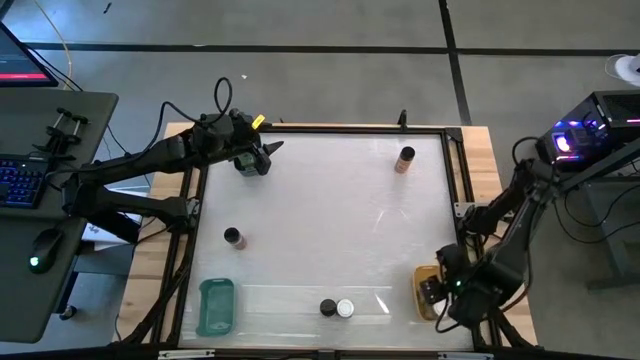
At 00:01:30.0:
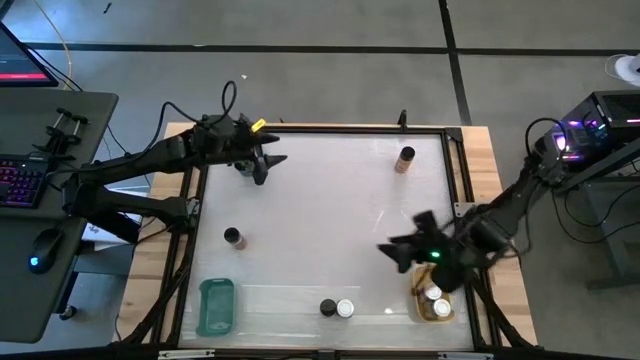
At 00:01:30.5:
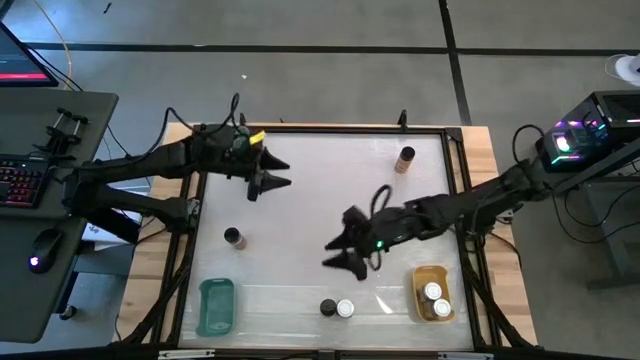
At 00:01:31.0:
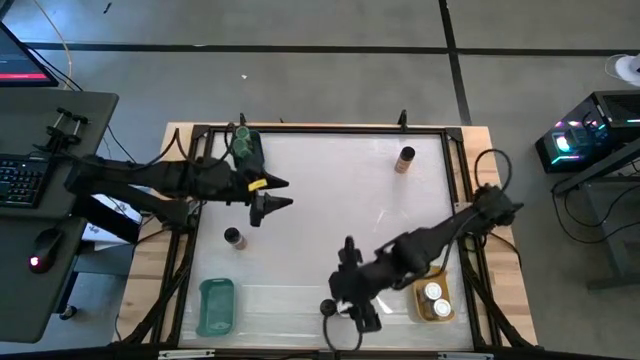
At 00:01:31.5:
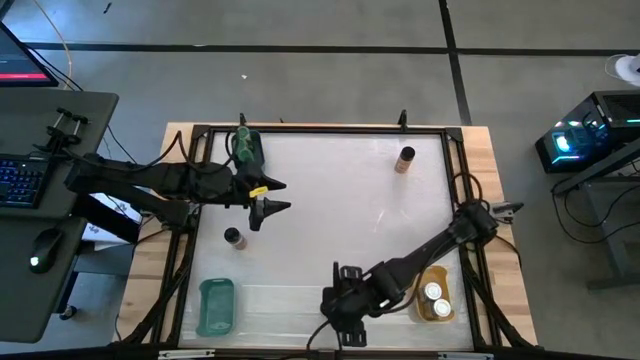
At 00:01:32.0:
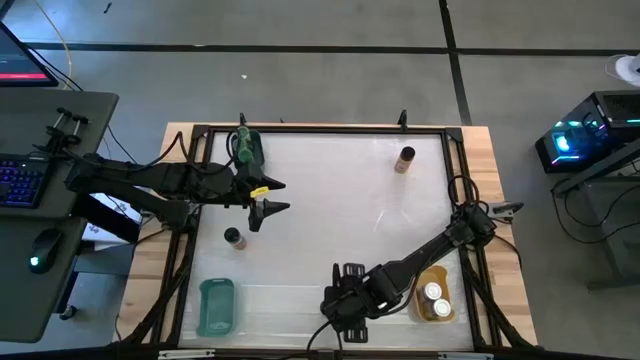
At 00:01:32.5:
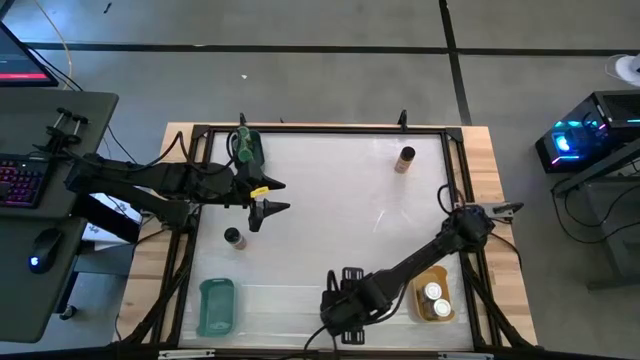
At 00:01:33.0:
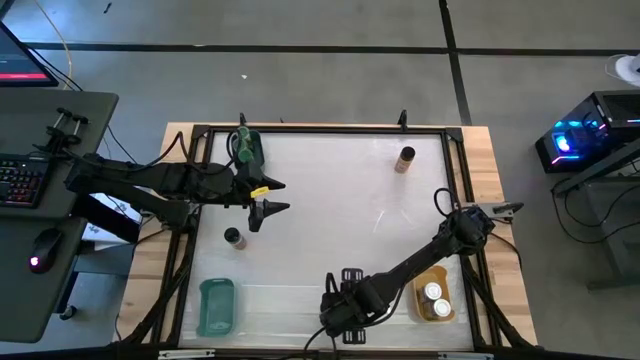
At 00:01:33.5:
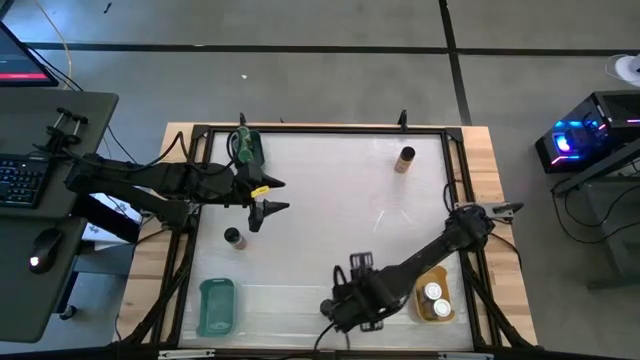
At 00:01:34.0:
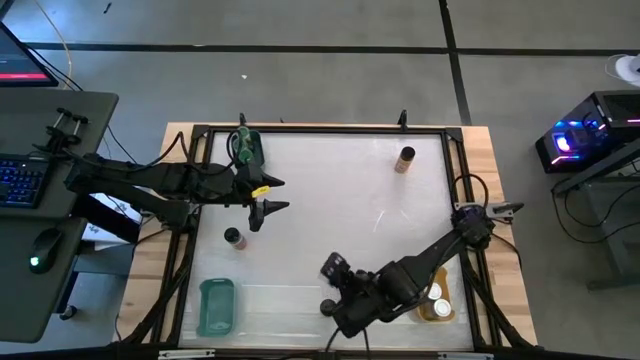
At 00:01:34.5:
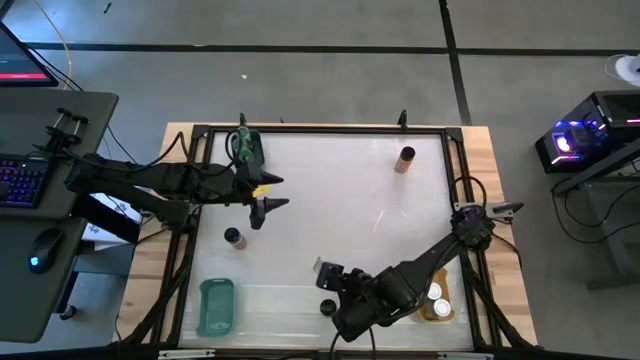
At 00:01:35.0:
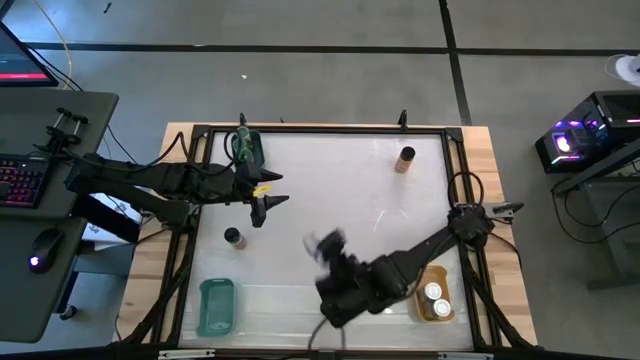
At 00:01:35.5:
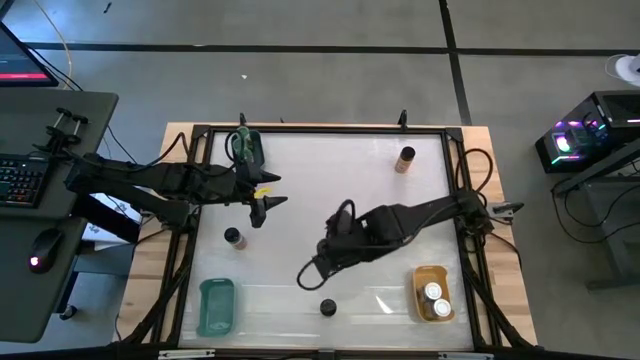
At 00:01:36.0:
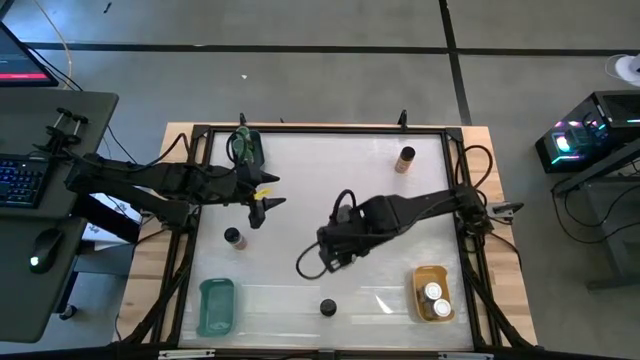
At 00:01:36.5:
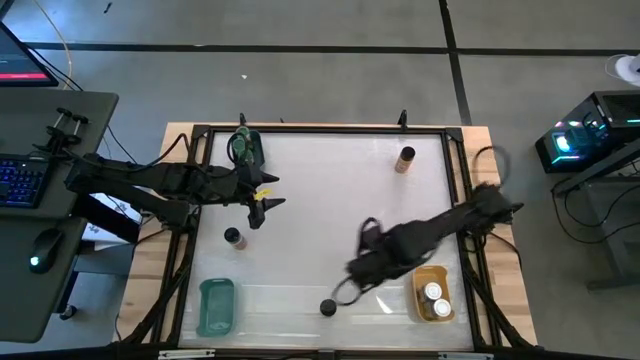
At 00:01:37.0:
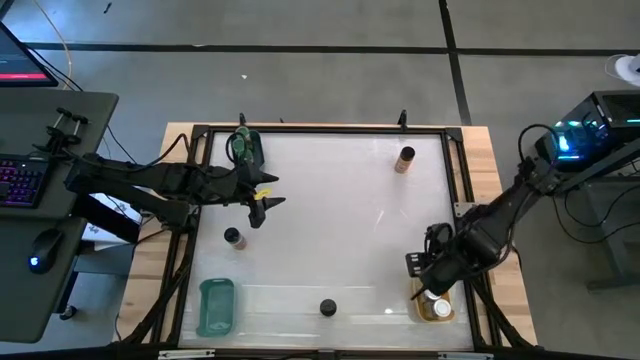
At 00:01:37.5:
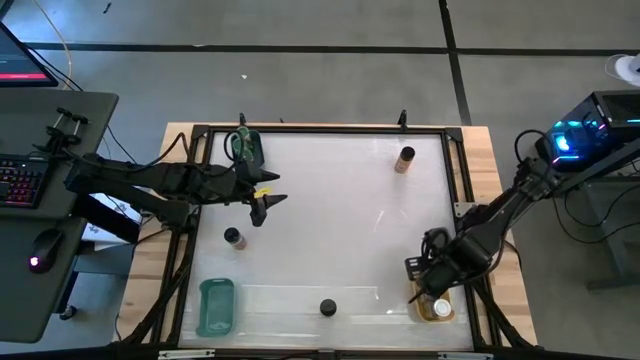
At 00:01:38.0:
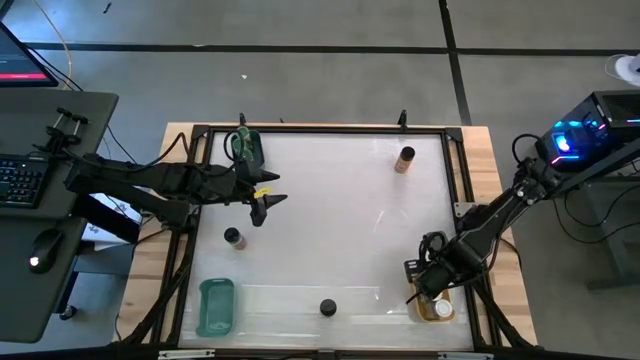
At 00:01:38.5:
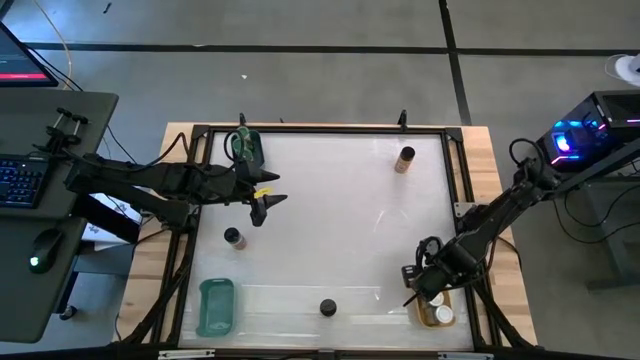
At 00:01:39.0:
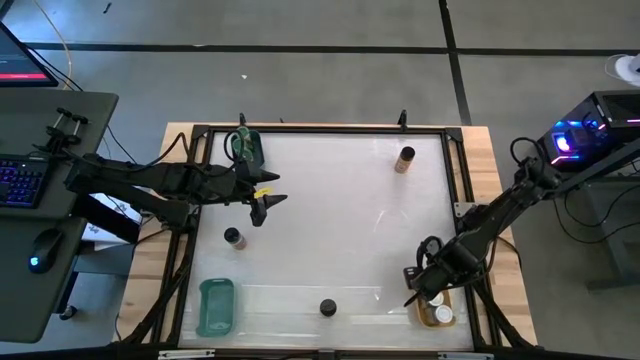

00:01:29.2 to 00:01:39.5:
Task: Sort spices by type
Put the white seasoning bottle into the yellow bin

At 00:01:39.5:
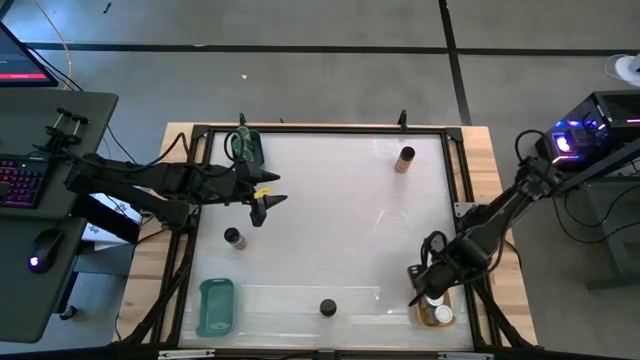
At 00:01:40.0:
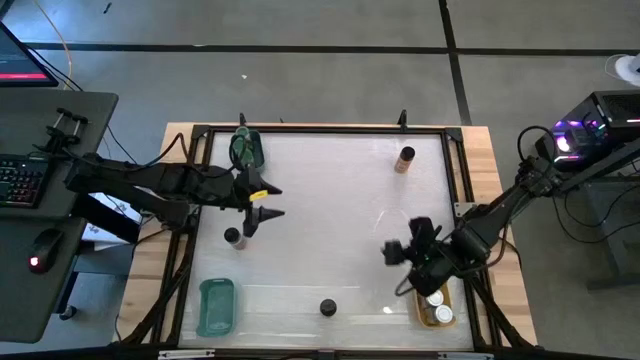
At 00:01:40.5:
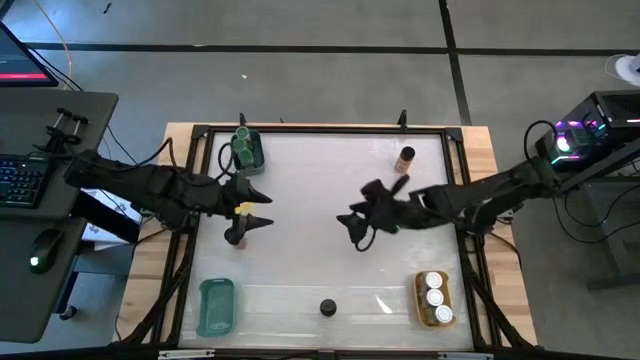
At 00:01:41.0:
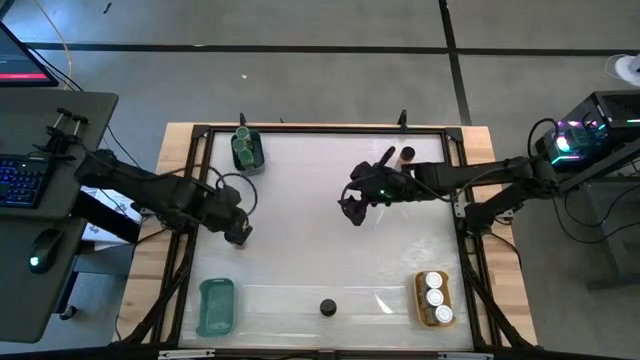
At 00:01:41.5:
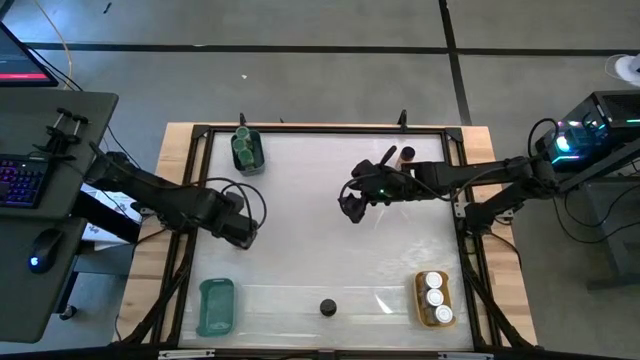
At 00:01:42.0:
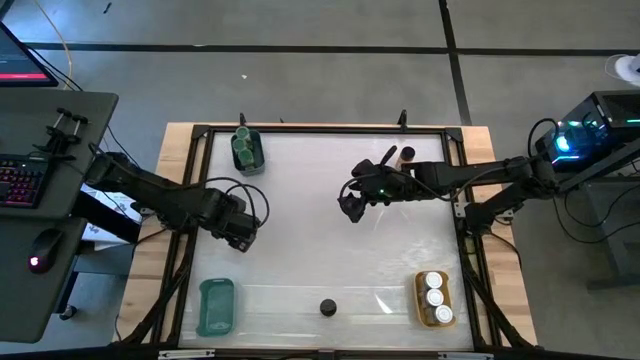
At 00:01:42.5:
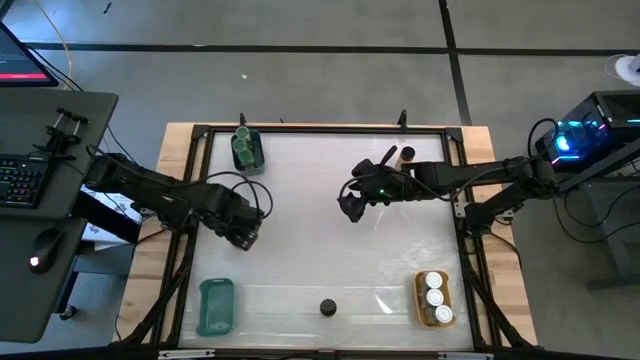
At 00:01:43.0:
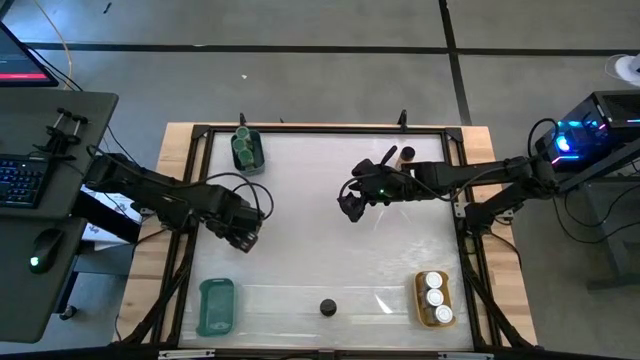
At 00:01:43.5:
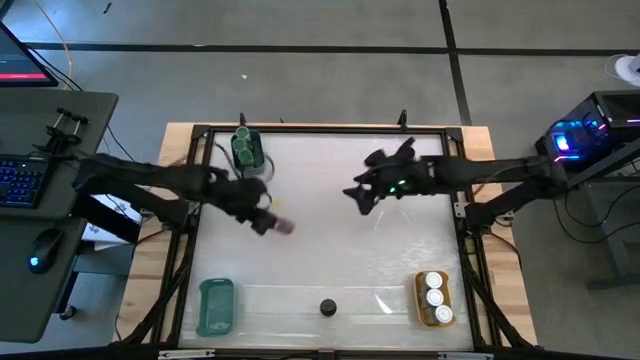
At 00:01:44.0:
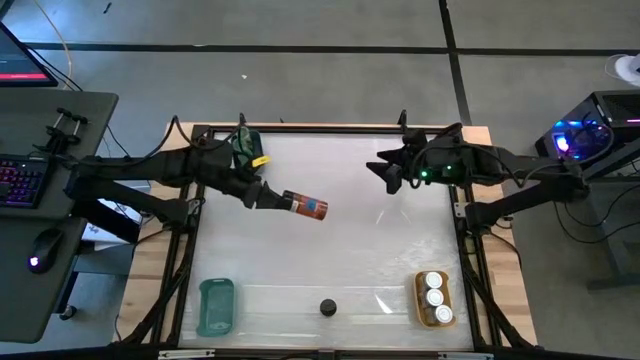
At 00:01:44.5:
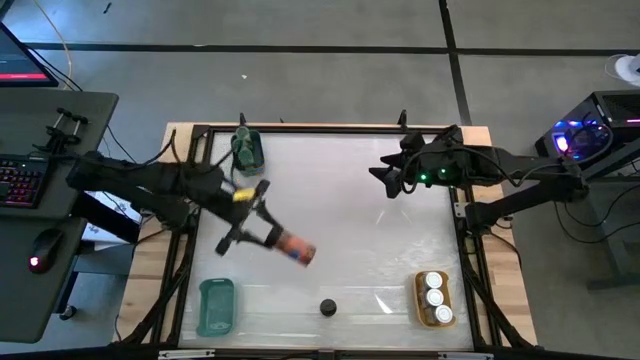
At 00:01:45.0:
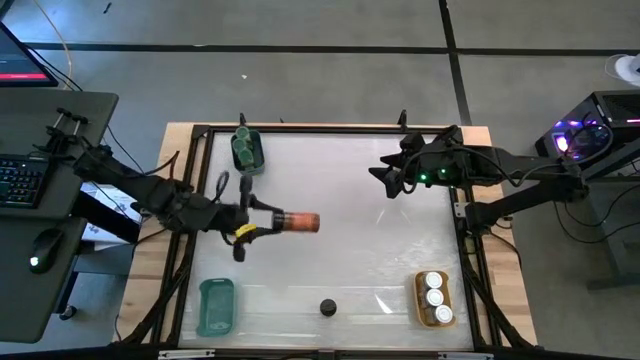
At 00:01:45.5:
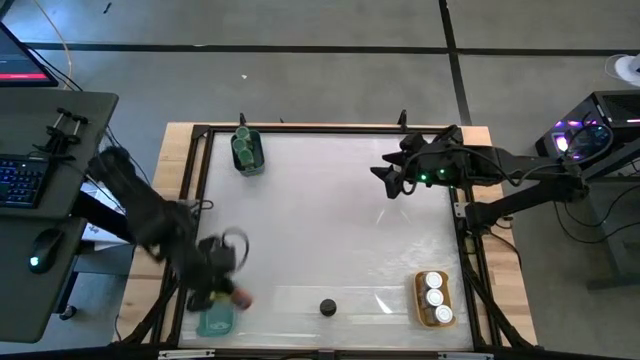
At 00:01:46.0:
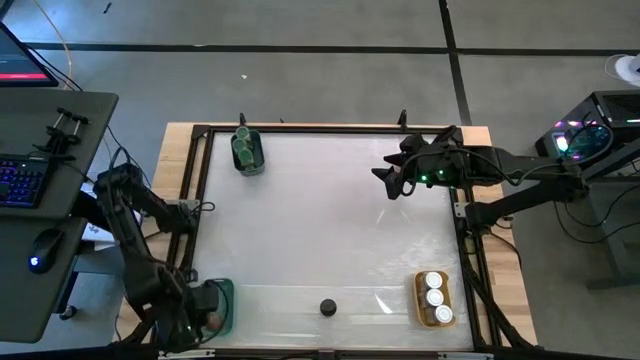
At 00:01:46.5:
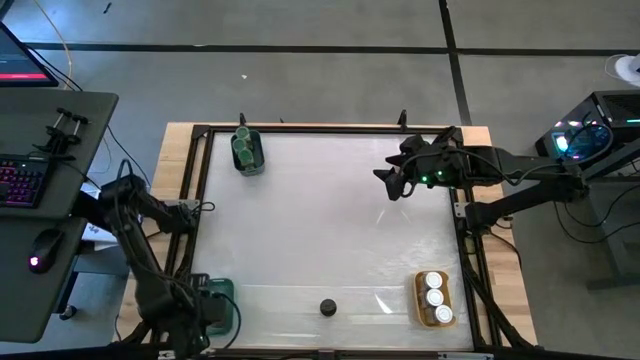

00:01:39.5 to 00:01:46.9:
Put the middle left black seasoning bottle into the green bin

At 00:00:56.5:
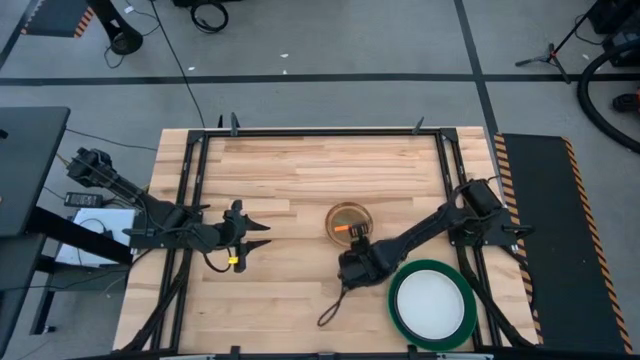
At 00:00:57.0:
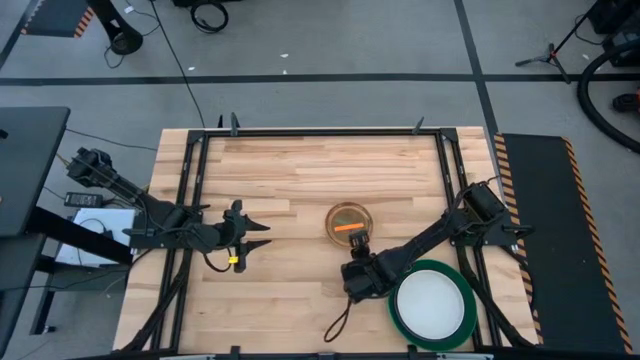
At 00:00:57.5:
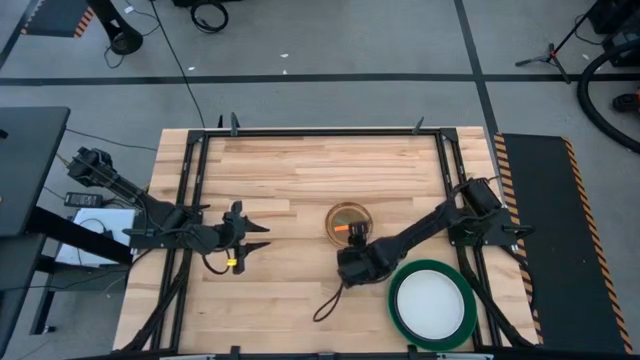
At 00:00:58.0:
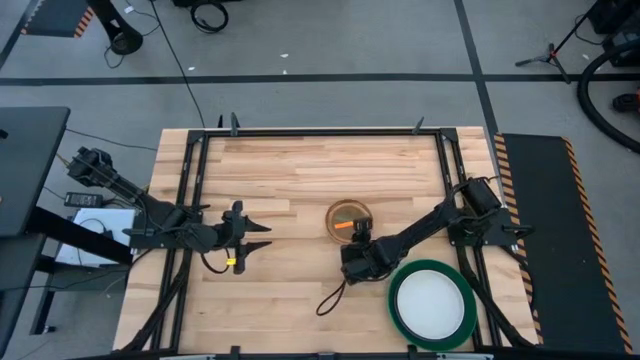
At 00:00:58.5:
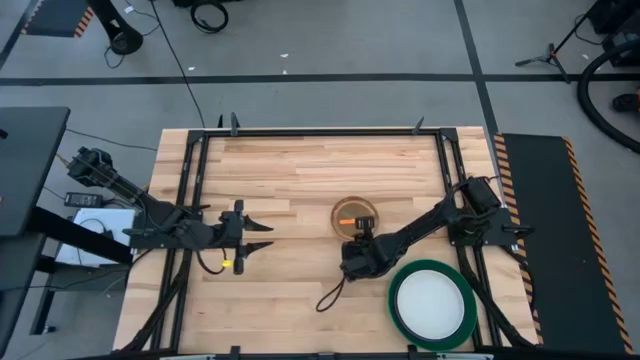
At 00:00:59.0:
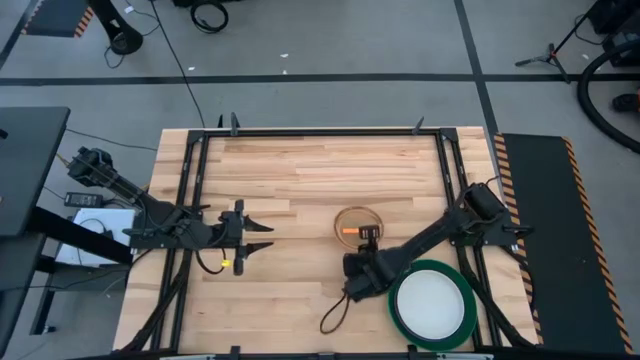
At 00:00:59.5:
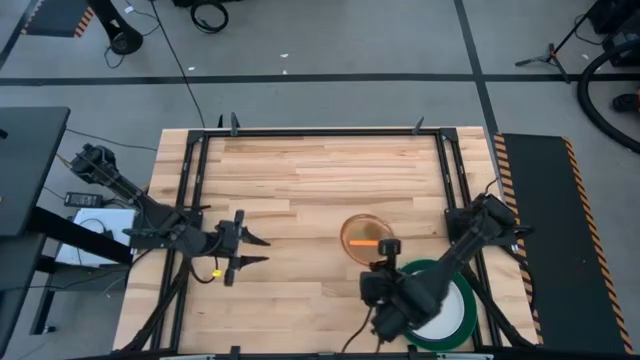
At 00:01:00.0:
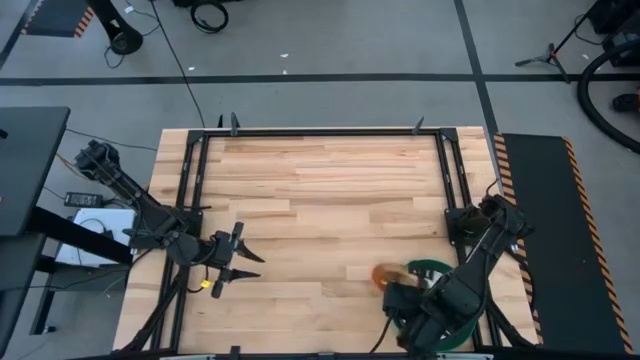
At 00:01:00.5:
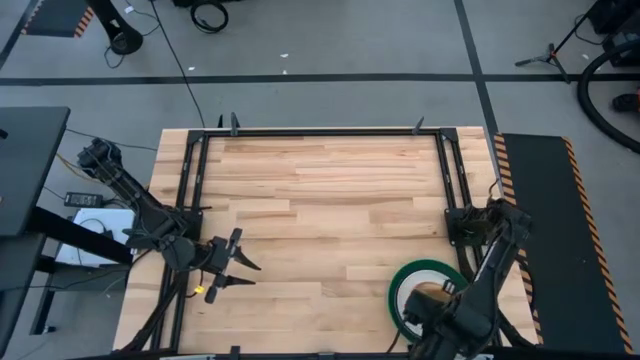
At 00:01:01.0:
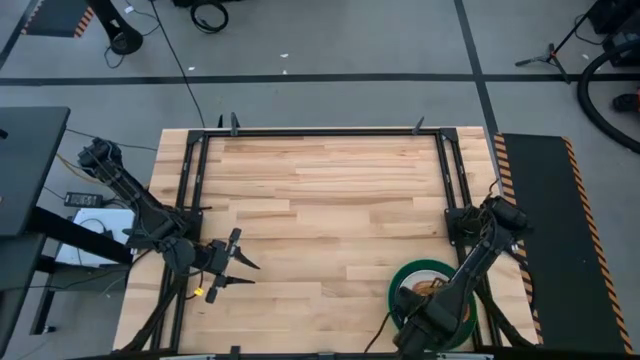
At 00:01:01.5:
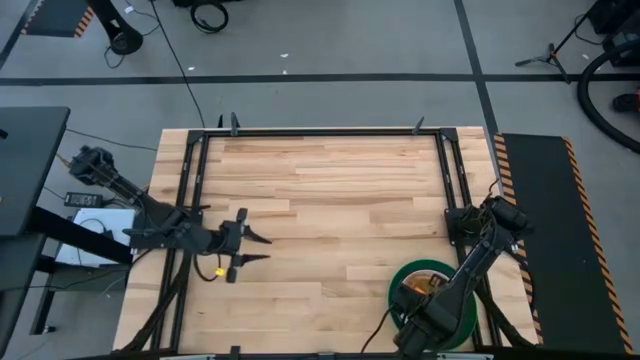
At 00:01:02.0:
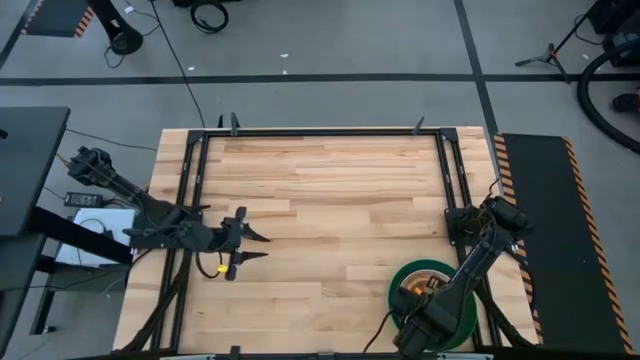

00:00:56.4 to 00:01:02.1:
Task: Stack plastic plates
Stack the stacked transparent plates on top of the white plate
